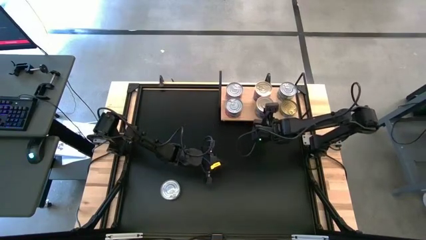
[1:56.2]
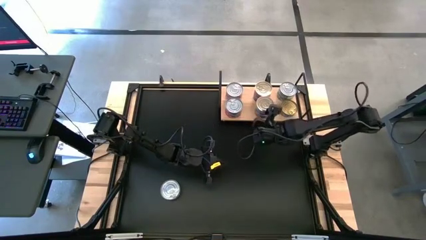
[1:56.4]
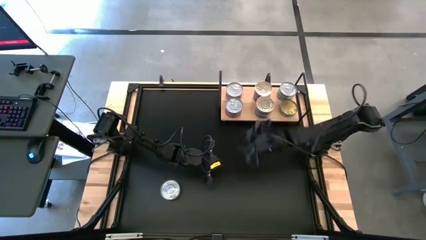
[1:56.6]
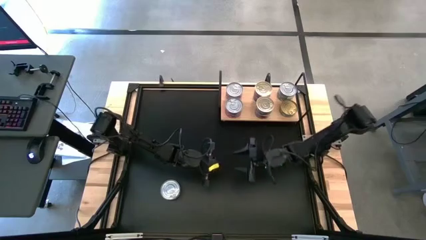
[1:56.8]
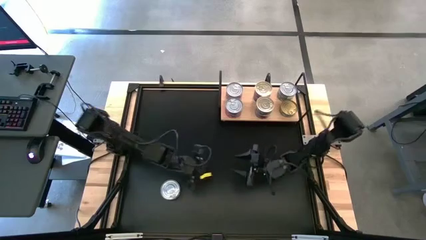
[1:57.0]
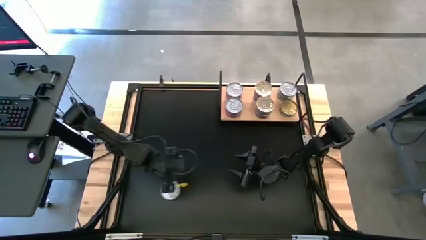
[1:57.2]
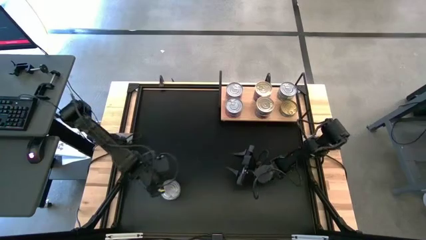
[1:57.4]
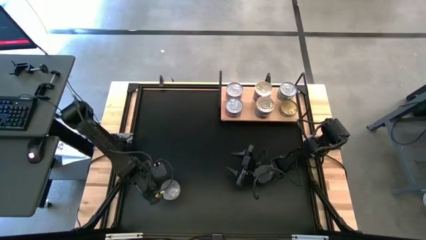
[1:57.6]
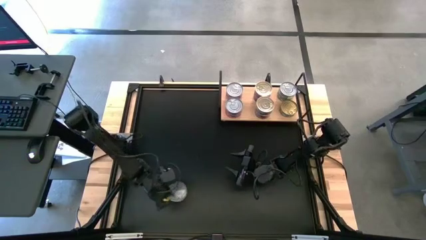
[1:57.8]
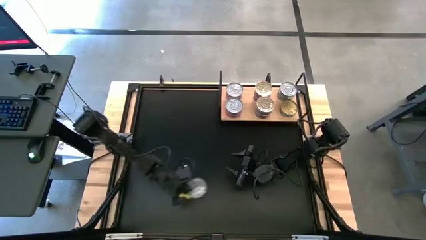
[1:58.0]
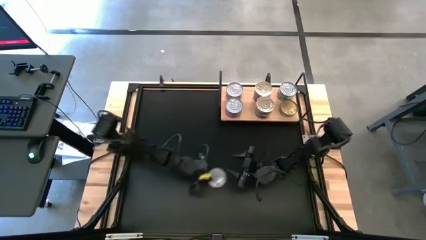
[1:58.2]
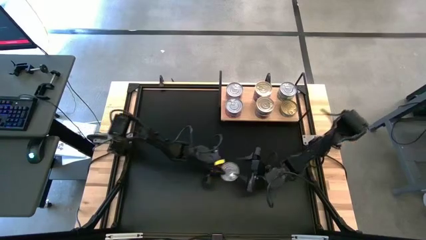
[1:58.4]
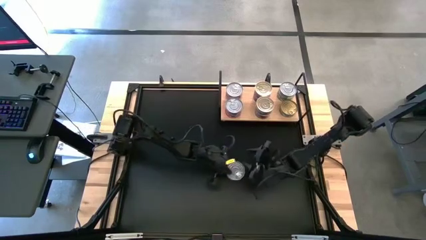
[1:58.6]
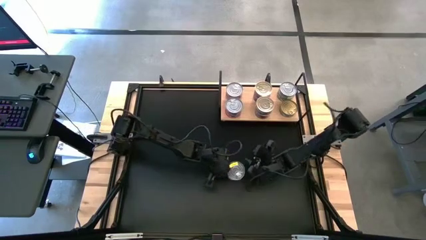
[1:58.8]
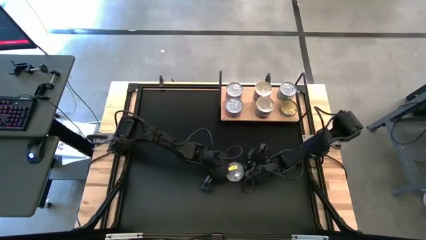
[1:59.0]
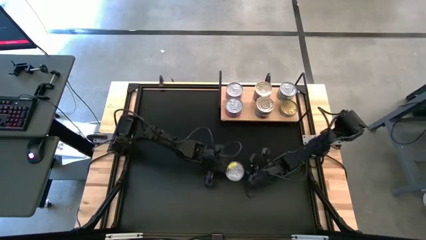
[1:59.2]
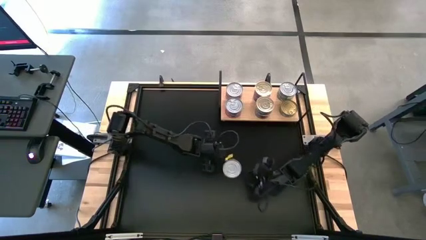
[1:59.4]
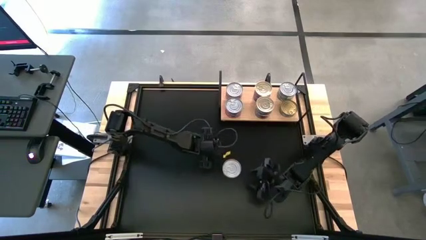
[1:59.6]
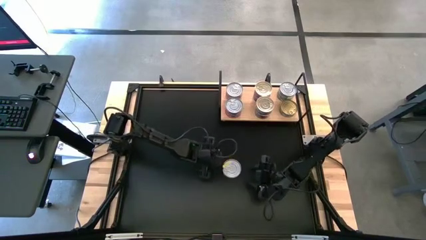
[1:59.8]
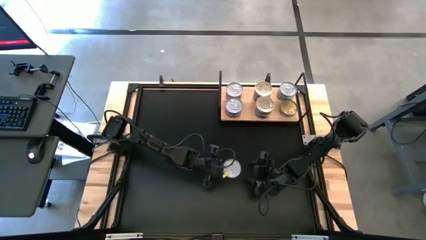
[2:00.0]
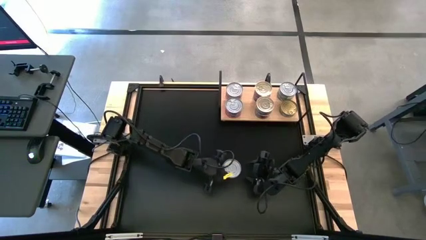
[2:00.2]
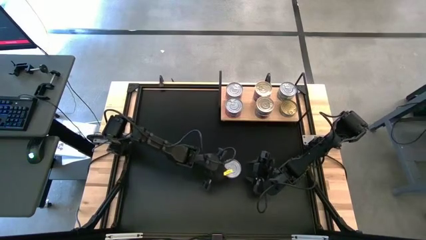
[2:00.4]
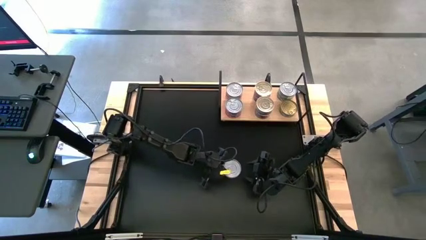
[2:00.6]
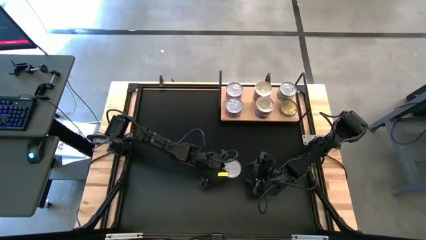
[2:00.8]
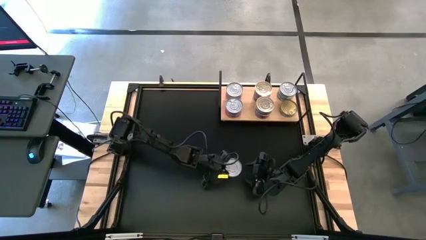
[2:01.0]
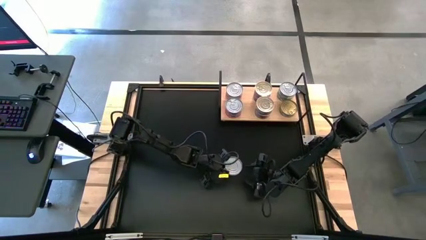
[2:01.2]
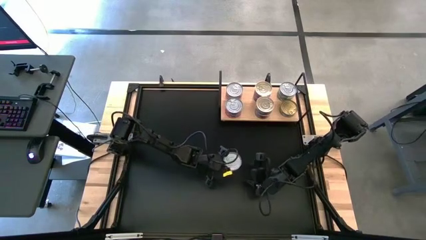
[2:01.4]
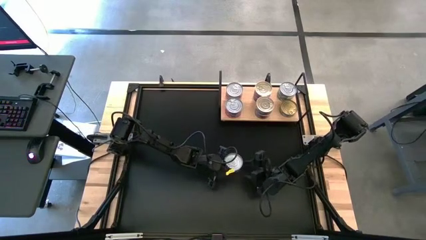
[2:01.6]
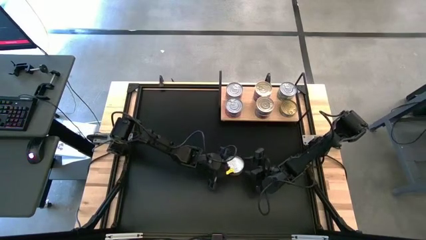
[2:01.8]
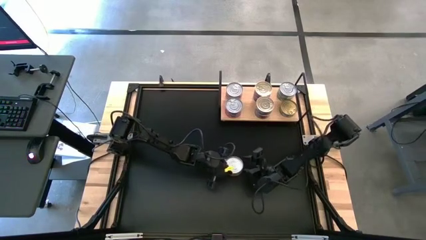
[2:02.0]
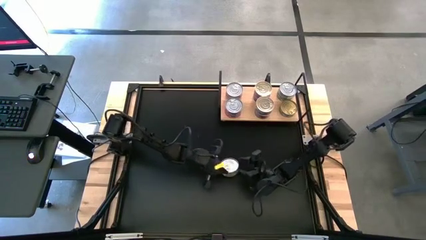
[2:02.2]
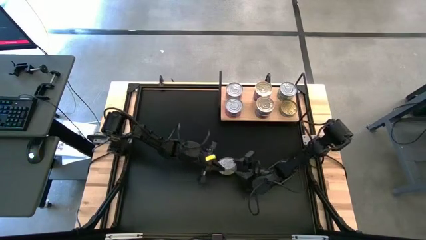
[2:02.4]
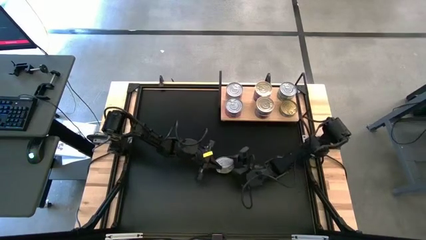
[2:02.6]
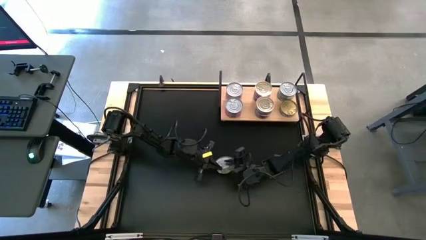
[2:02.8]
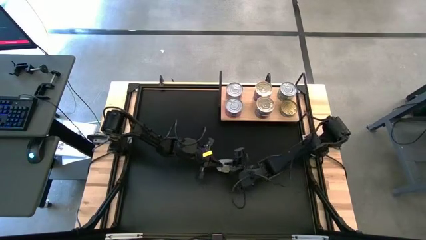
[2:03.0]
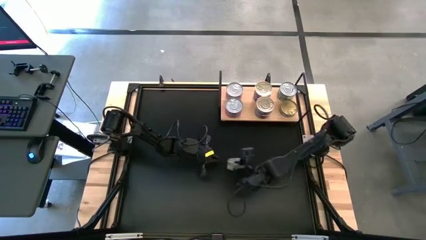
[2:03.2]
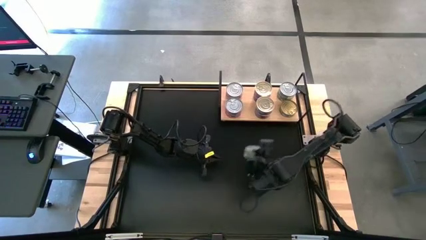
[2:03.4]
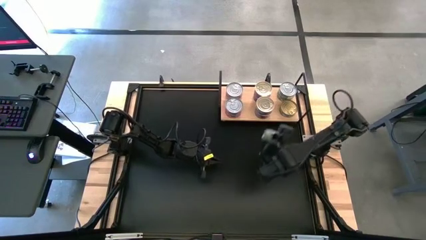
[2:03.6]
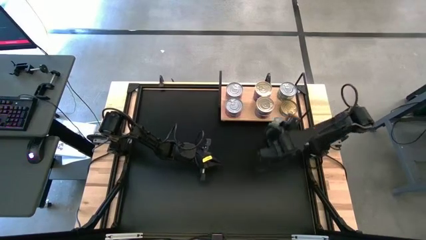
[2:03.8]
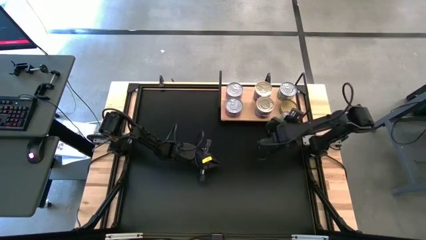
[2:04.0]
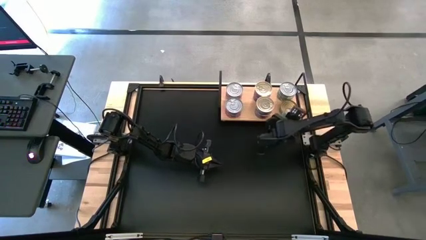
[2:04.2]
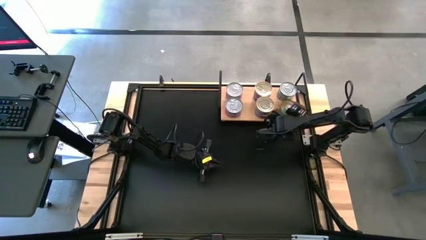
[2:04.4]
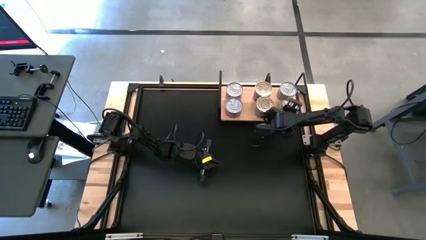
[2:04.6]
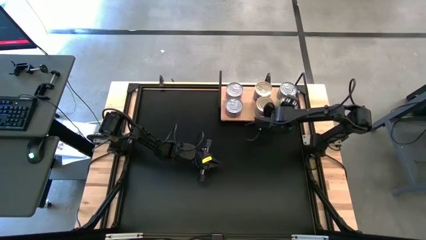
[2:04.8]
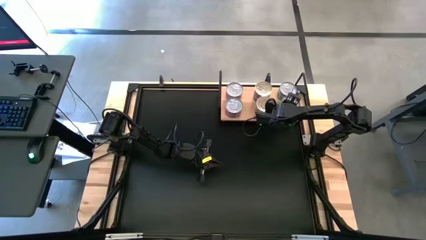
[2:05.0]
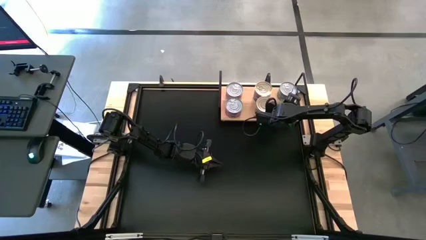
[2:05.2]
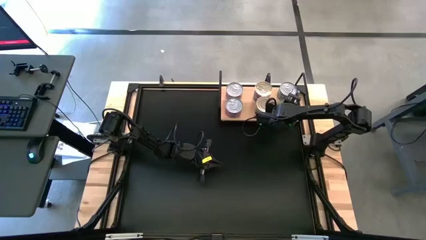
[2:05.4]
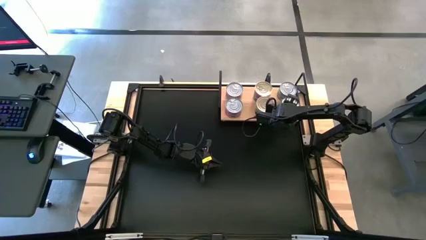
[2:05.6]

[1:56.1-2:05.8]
Task: Stack canned seafood by type on shelf
Stack the green tuna can on top of the other green tuna can on the shelf

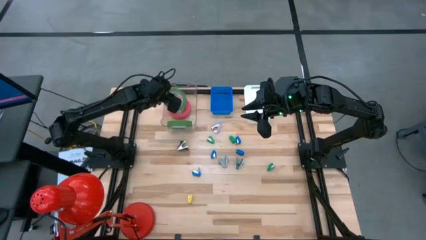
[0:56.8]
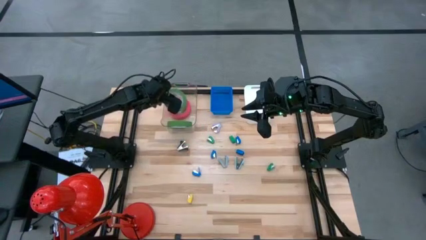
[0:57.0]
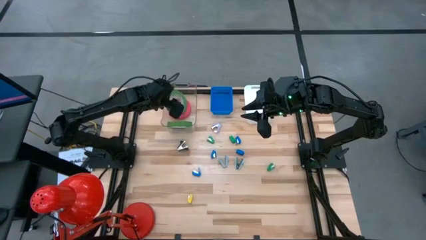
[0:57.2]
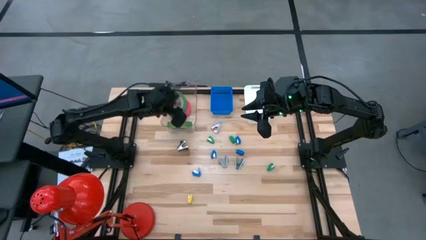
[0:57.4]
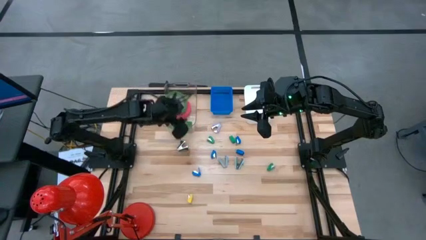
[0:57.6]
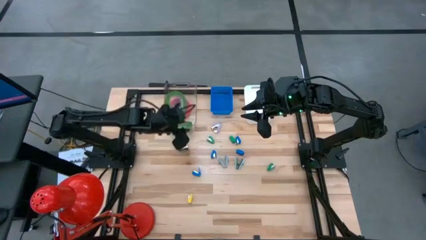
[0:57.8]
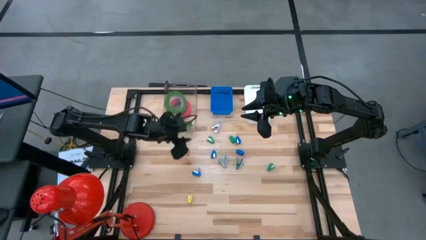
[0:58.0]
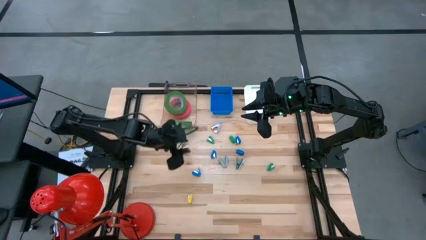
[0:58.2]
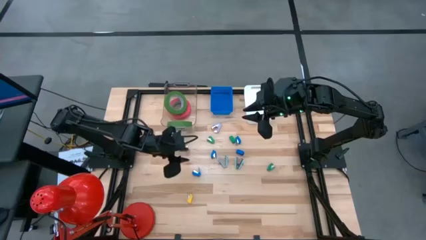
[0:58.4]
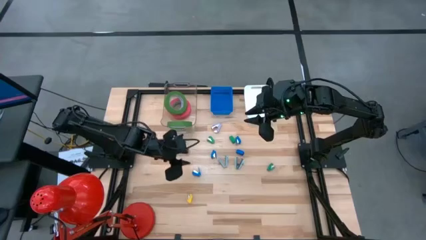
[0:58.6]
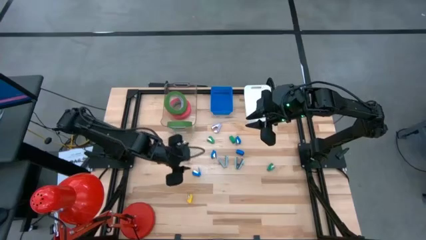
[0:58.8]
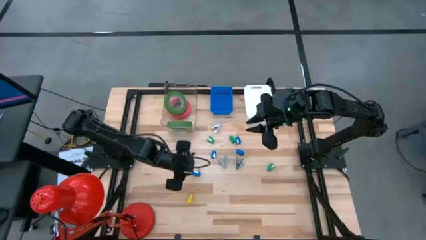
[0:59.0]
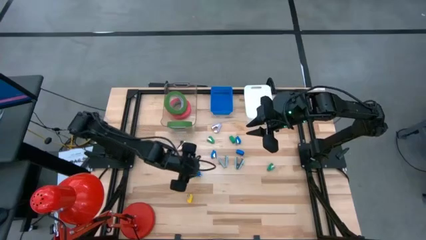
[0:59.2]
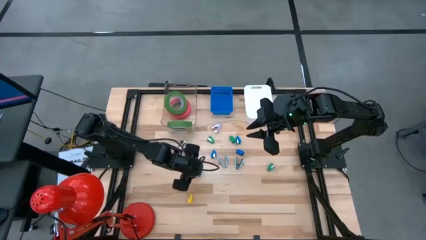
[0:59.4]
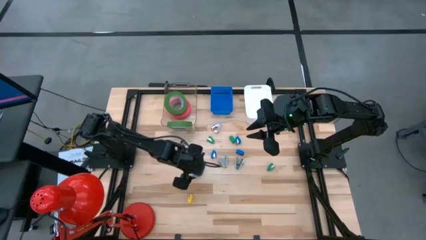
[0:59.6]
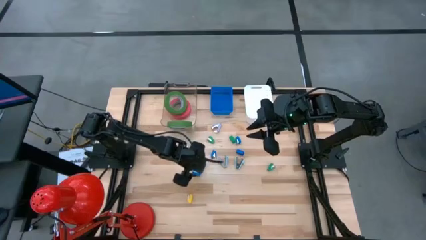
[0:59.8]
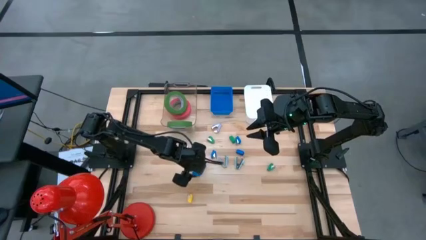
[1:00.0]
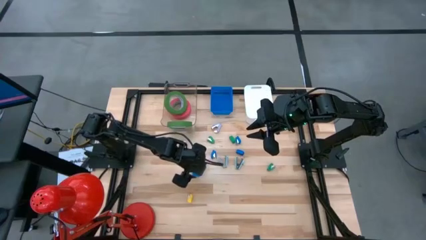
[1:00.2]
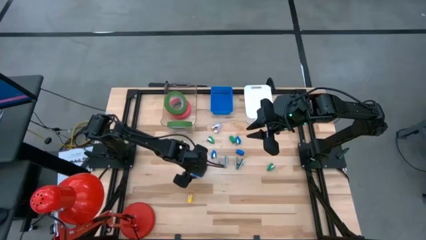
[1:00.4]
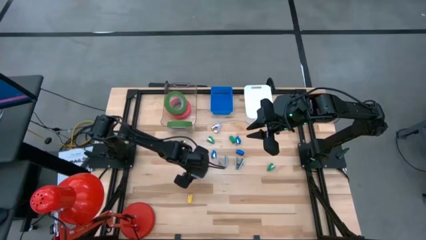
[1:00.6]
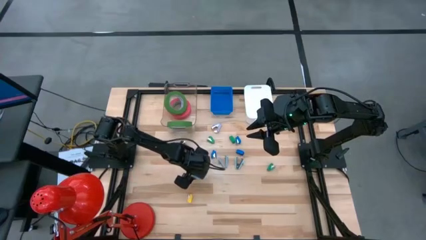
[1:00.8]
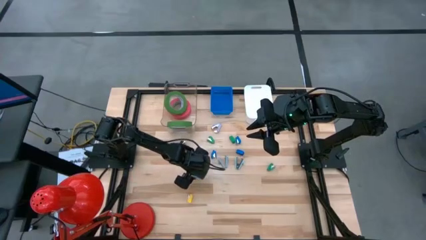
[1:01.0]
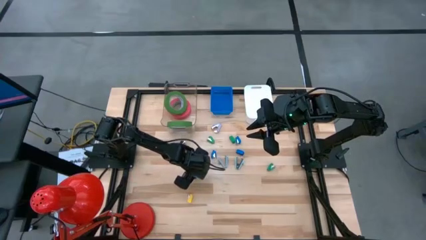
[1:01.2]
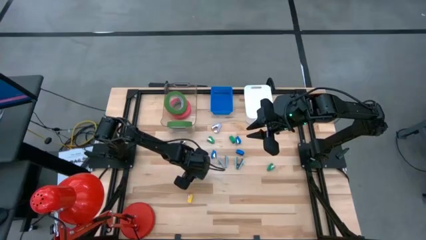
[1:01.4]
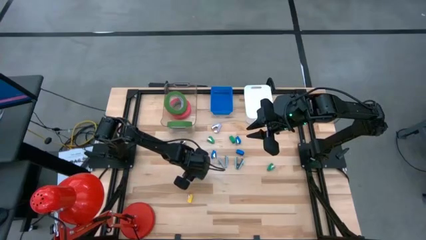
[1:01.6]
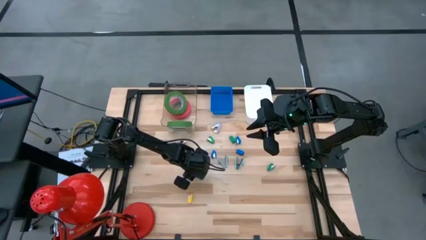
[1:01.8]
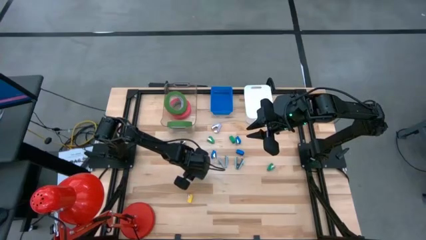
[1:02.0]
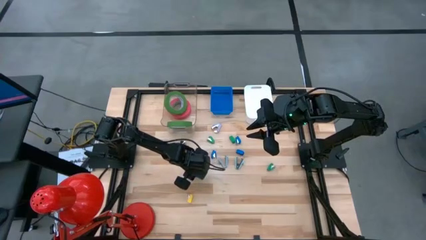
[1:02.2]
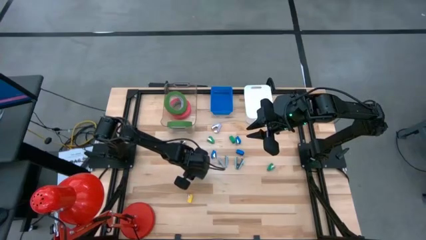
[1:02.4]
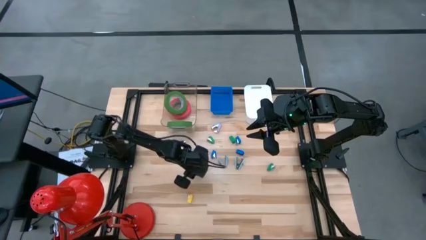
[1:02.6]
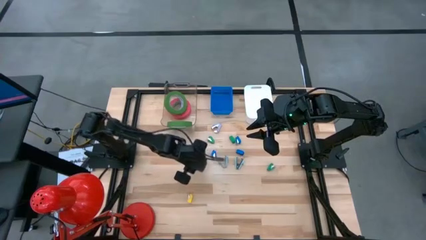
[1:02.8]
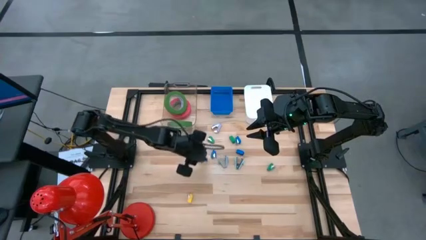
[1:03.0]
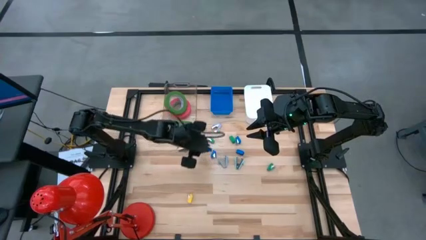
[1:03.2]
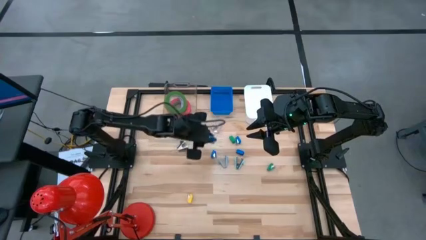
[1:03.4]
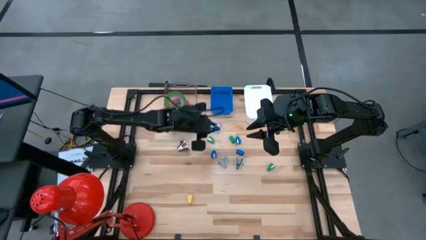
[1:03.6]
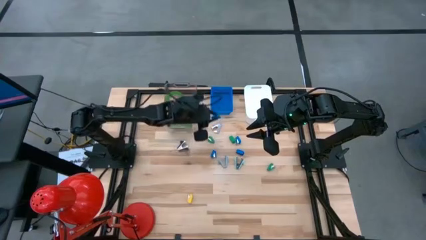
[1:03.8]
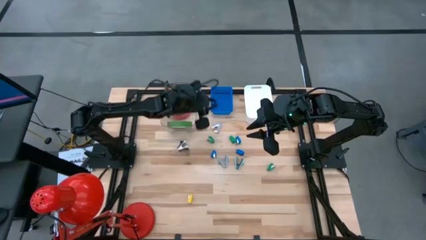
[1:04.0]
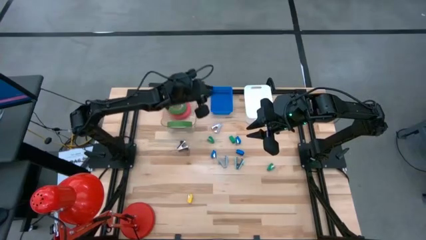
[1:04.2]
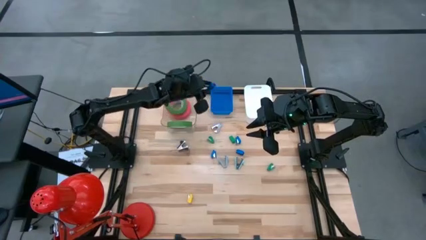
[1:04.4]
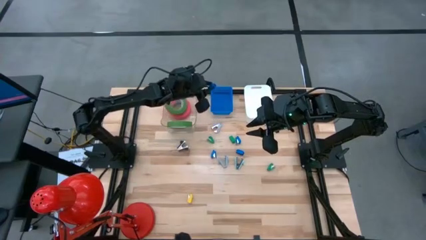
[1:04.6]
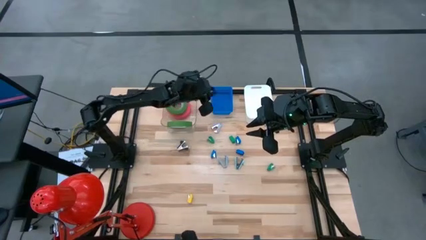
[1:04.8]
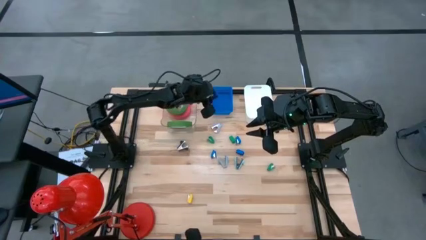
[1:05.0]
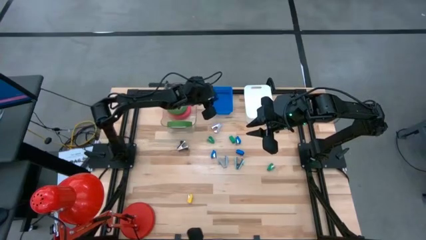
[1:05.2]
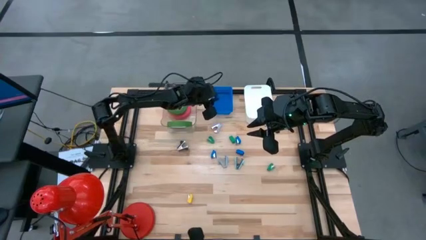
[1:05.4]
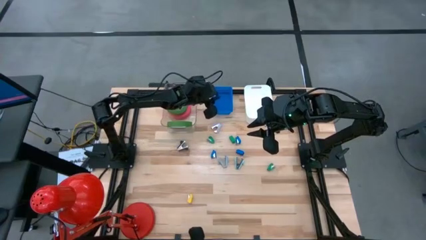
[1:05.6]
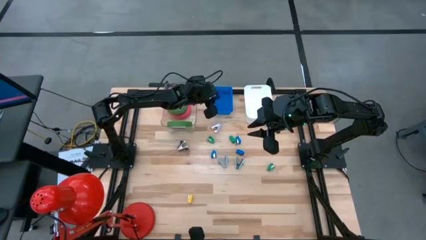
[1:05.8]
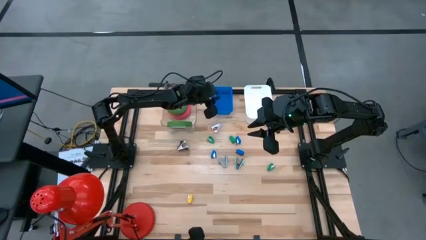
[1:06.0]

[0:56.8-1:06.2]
Task: Pick and place Stapler, Stapler remover, tape
Put the blue stapler into the blue bin
